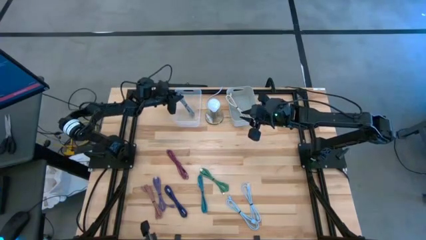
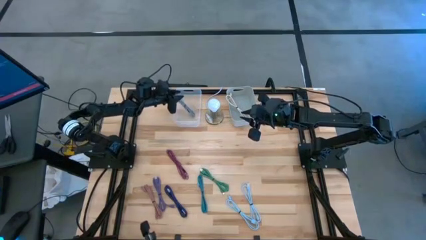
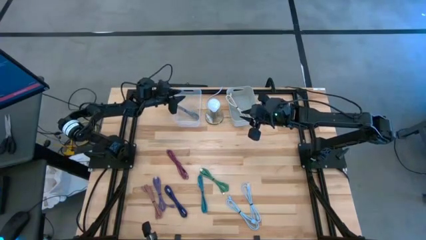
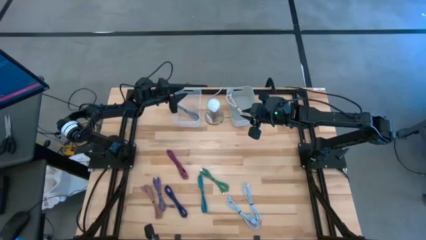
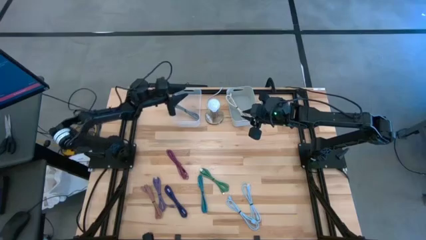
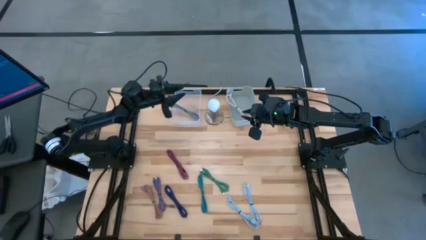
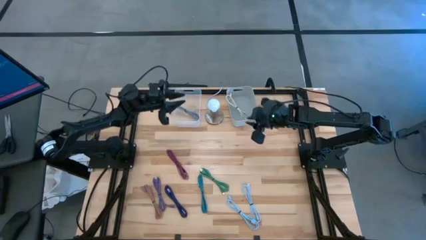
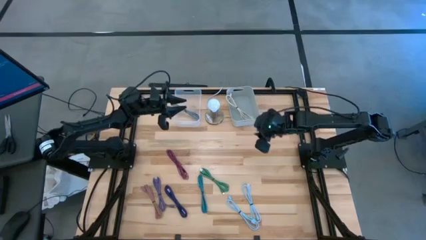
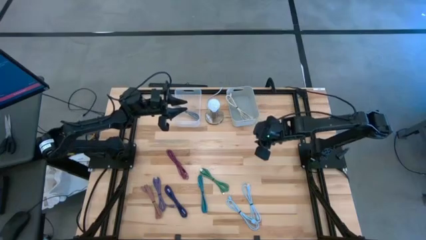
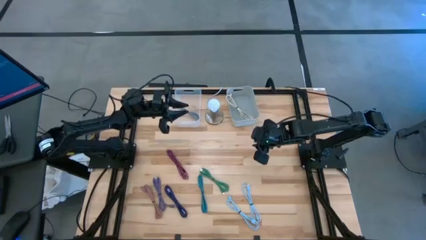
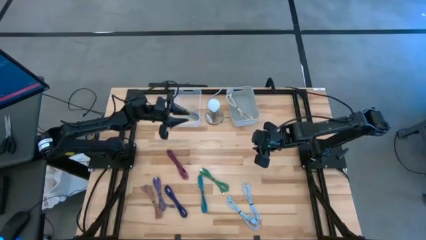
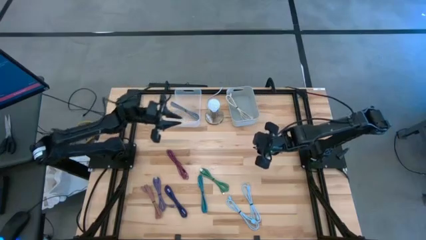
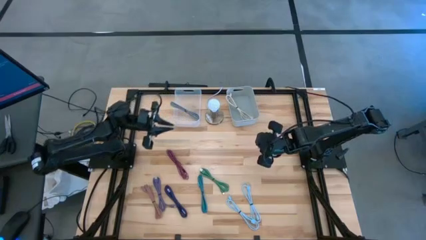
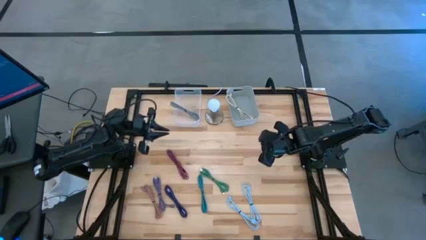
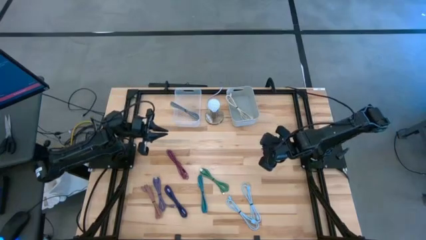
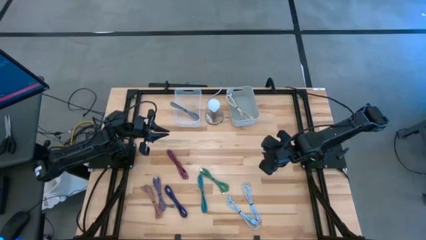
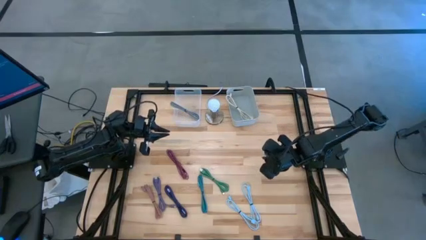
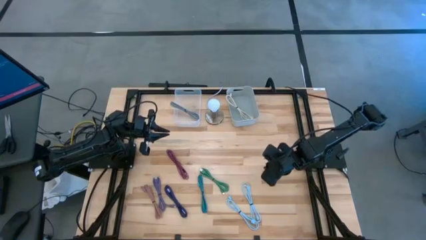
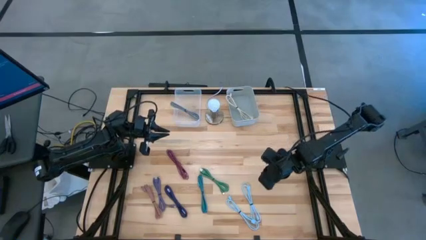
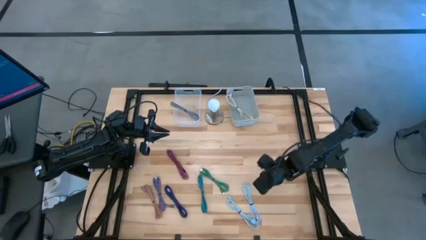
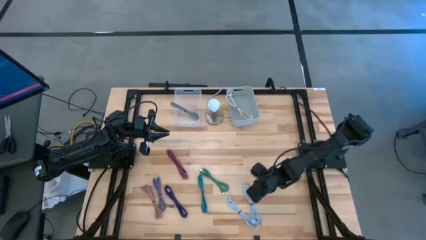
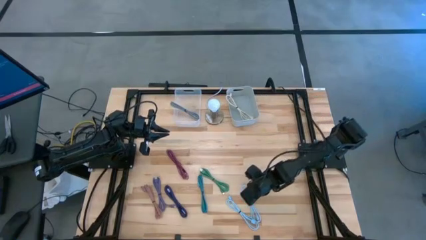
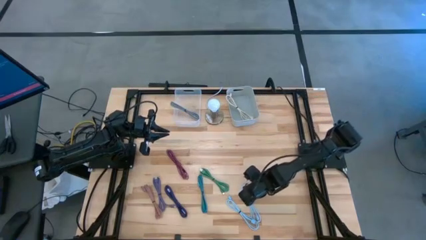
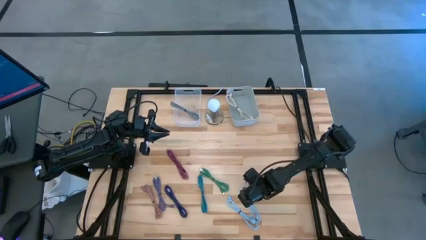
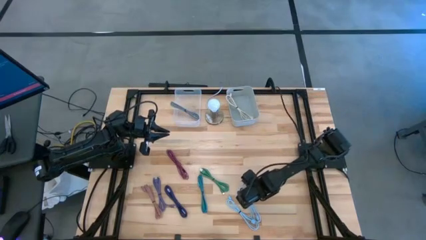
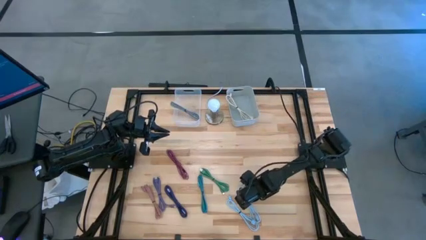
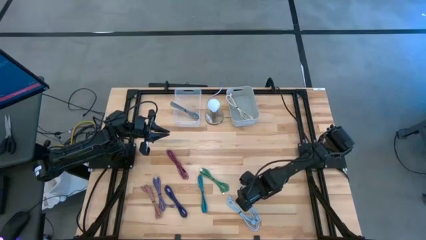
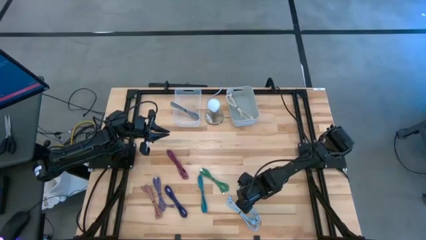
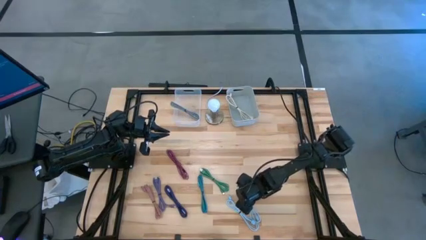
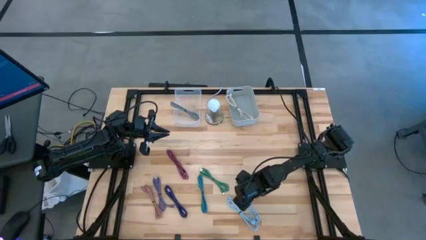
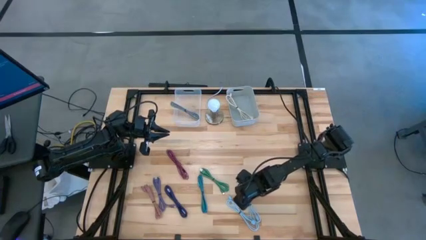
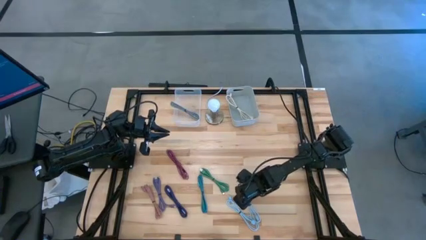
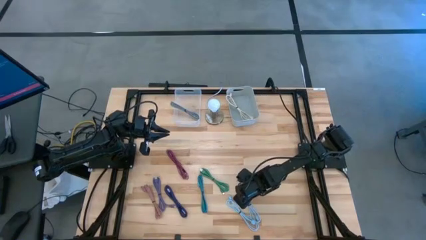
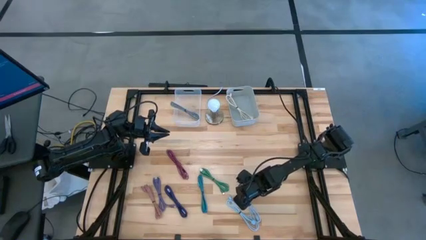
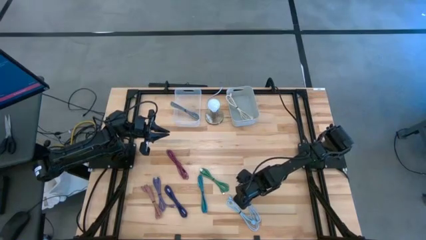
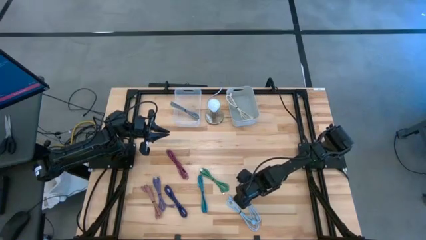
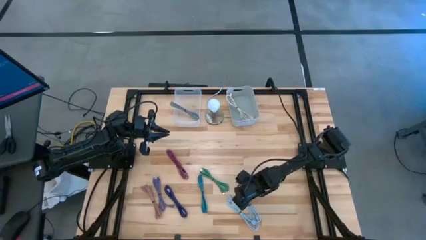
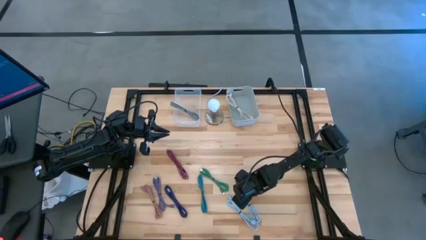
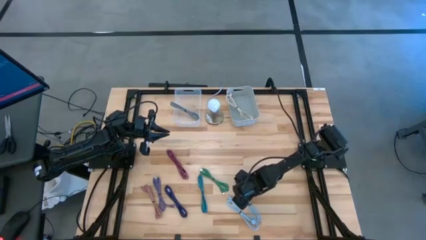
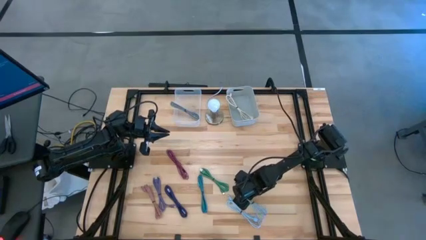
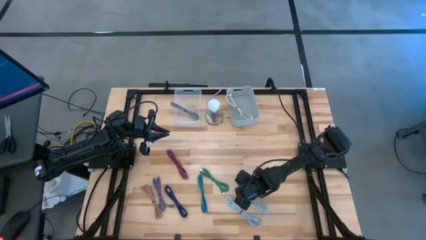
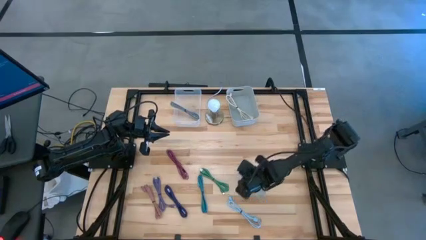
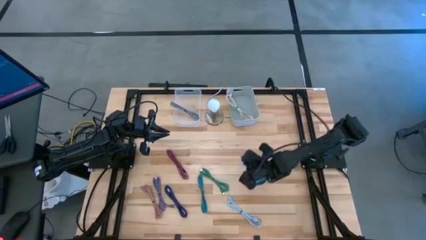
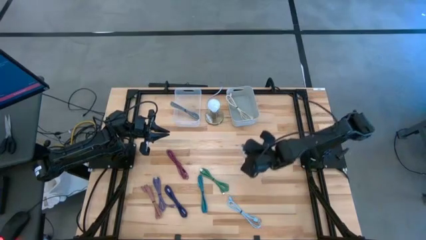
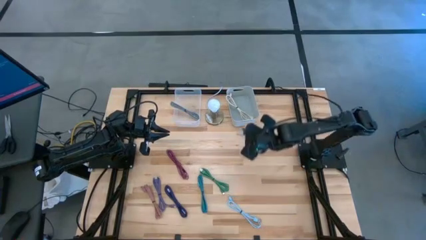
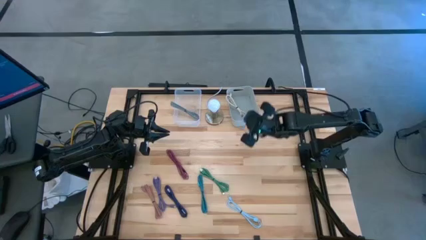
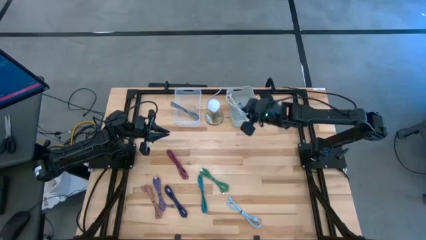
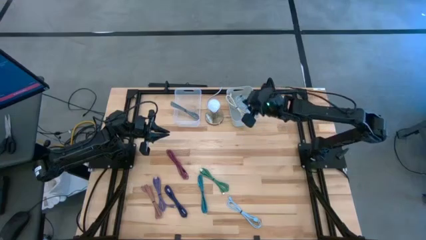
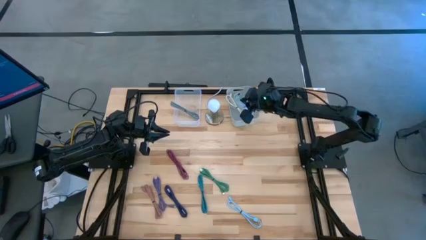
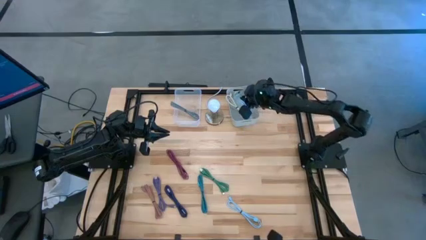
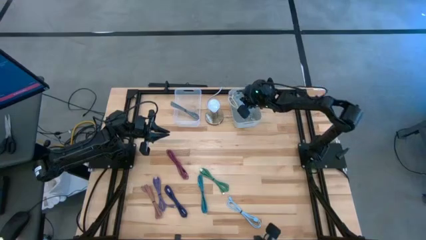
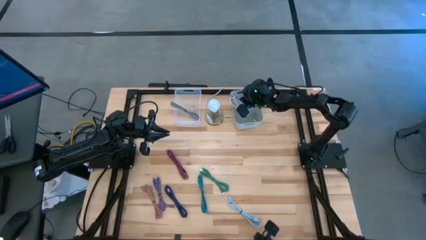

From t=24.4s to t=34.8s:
Task: Pick & Place USB Port
Put the right light blue charger cable into the gray bin

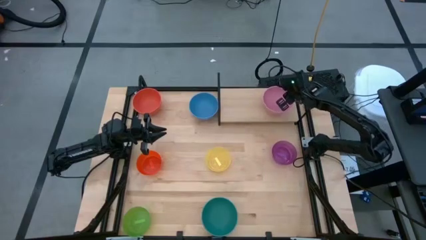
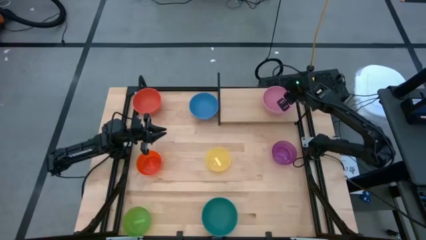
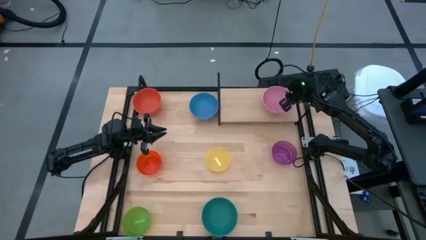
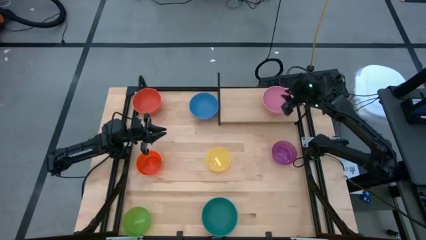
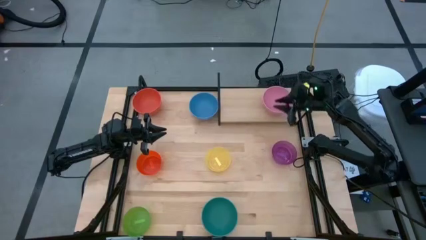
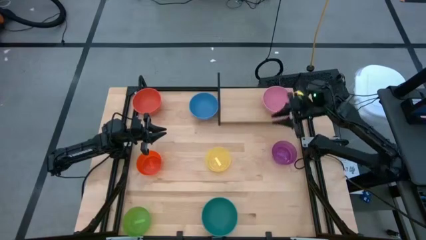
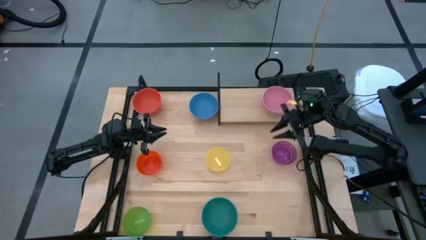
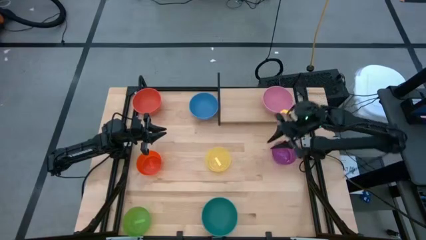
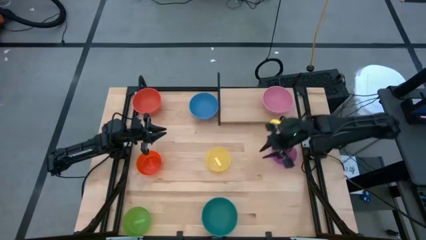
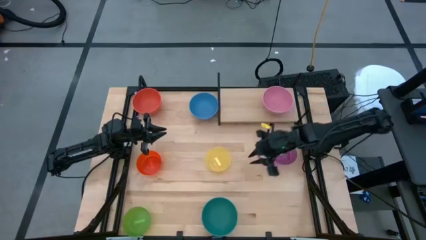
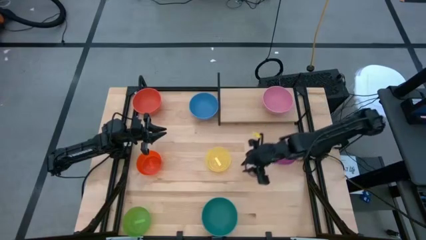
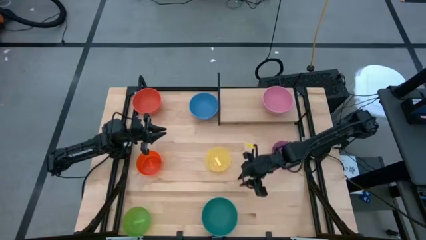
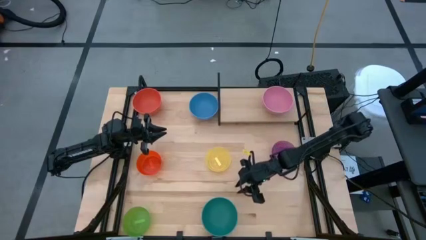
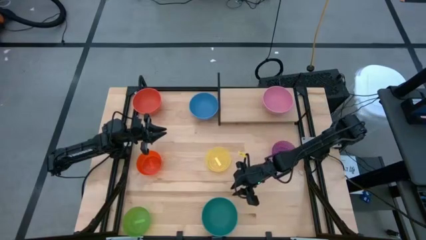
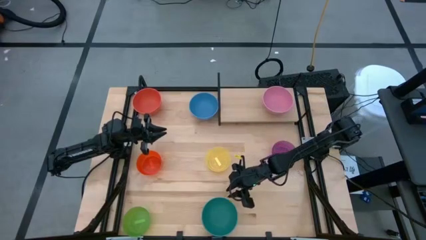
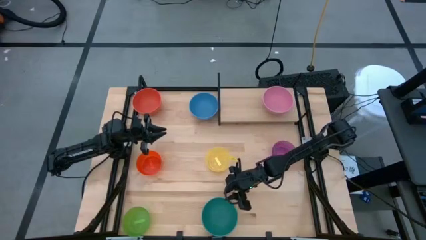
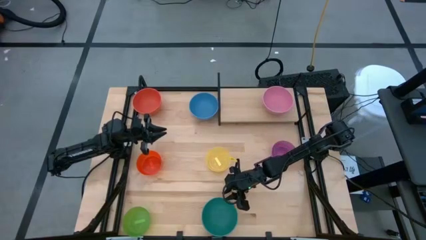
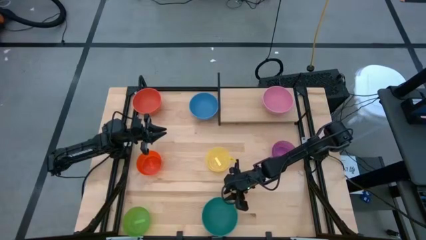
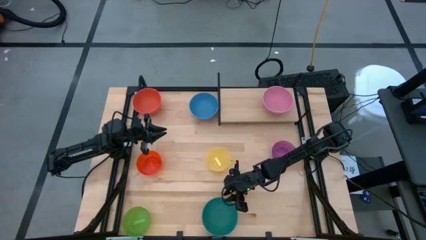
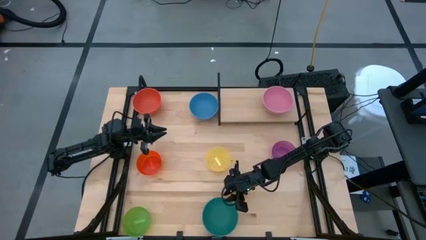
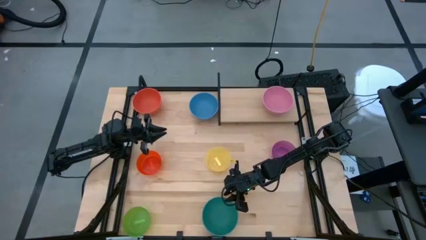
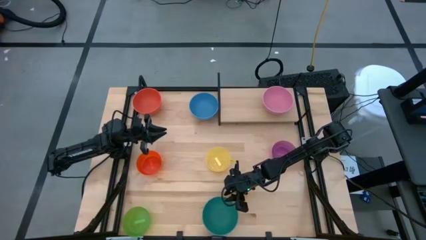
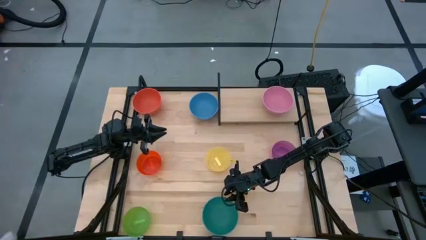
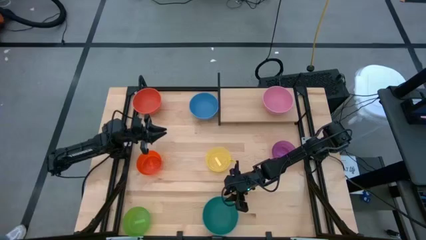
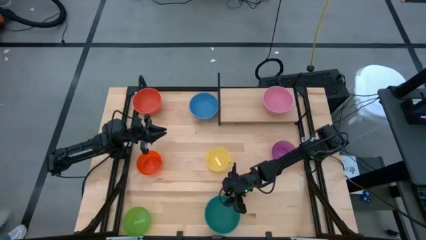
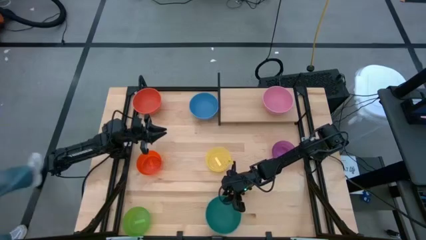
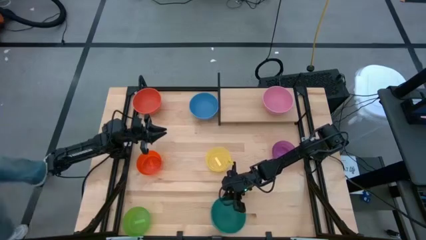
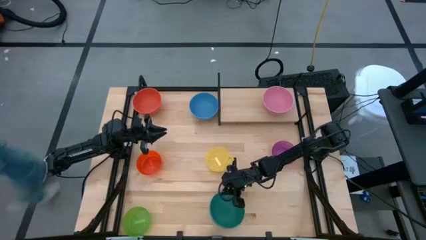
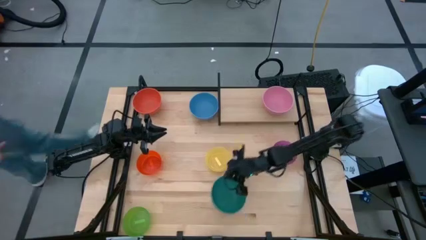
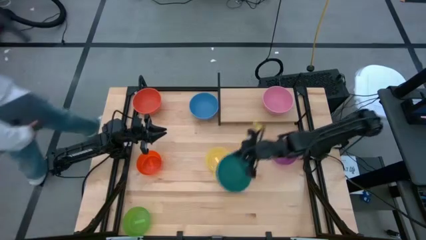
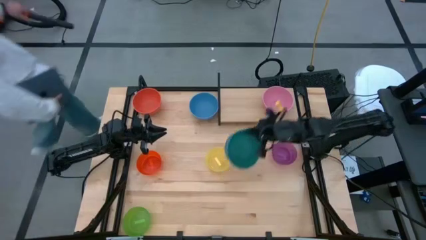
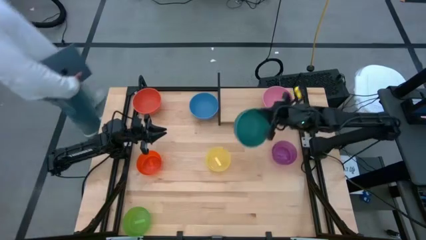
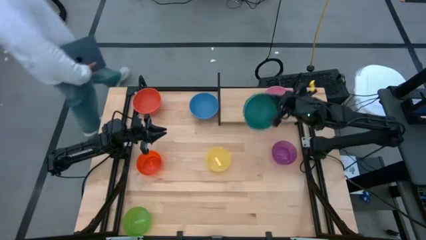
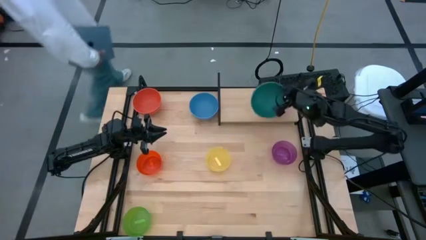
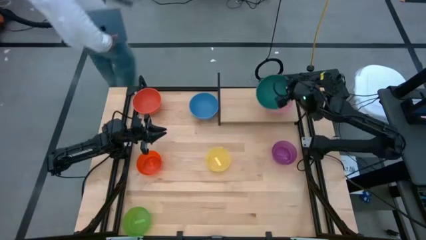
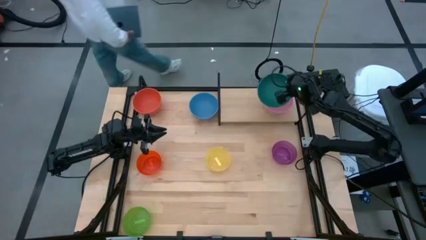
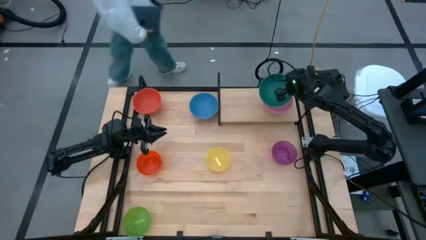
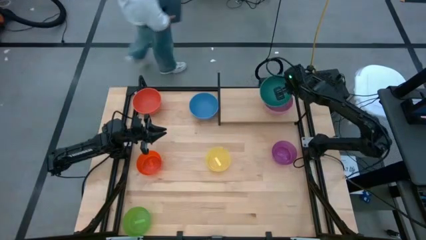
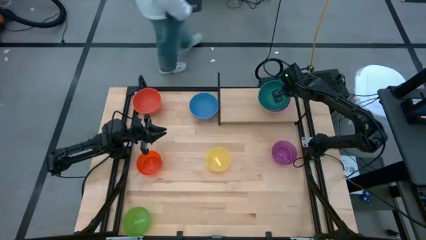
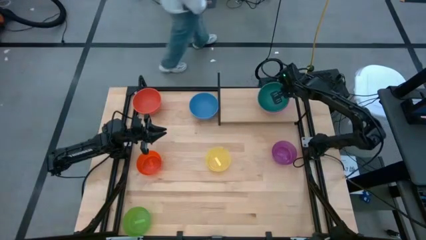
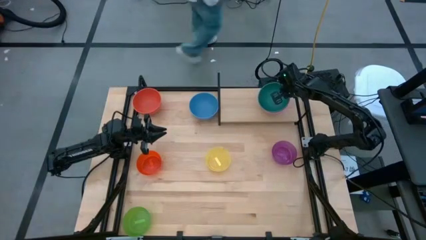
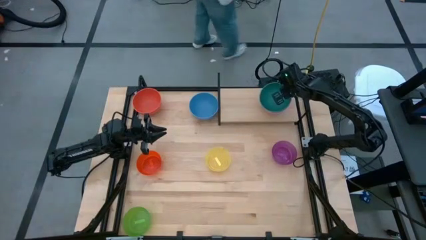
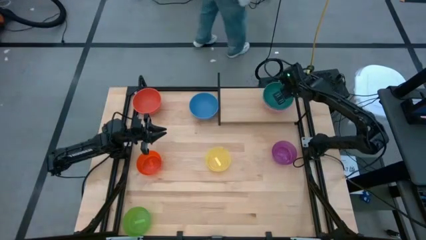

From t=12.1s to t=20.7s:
Task: Place and stack bowls onto a shelf
Stack the green bowl on top of the pink bowl on the shelf
